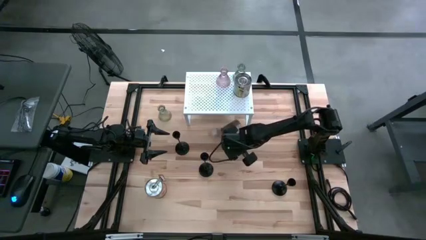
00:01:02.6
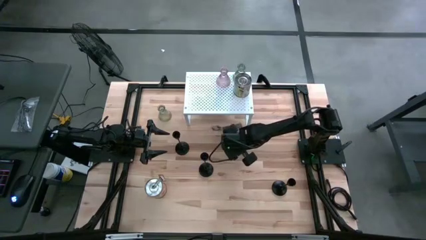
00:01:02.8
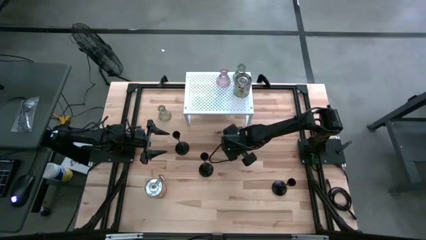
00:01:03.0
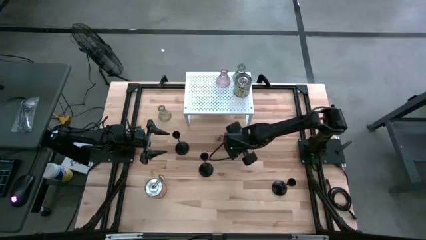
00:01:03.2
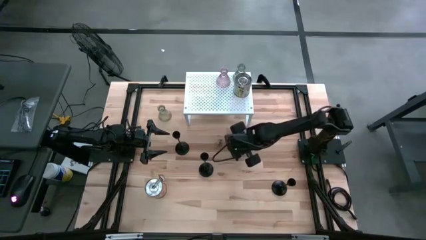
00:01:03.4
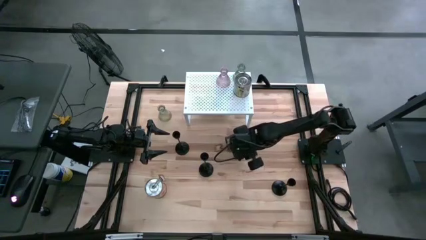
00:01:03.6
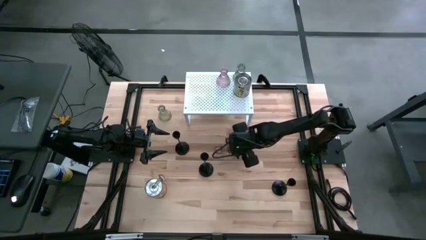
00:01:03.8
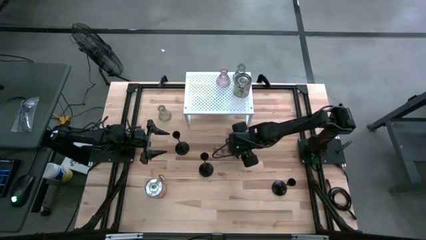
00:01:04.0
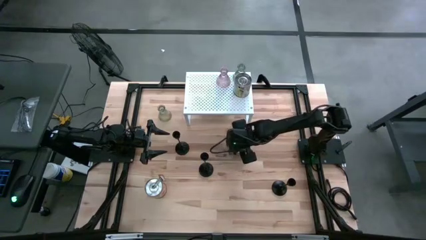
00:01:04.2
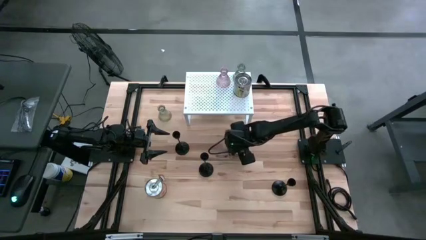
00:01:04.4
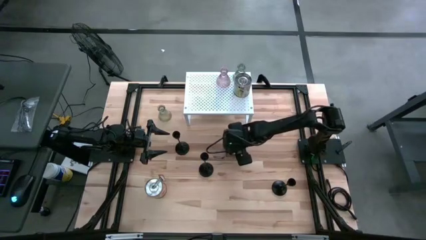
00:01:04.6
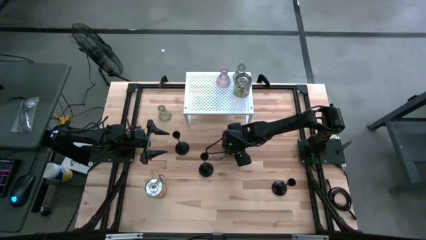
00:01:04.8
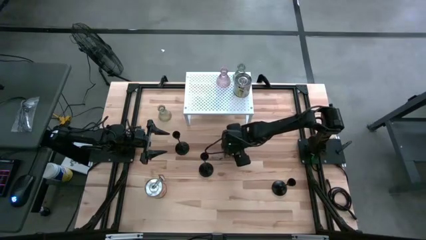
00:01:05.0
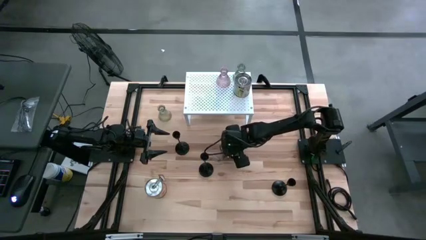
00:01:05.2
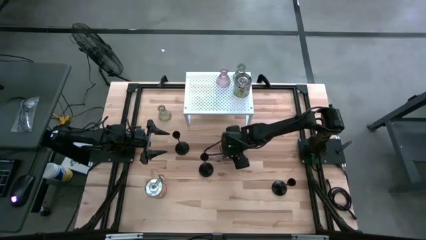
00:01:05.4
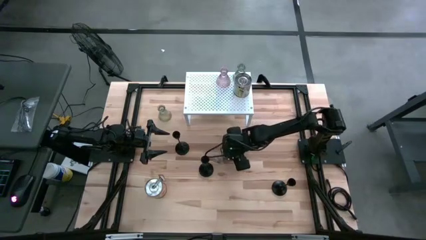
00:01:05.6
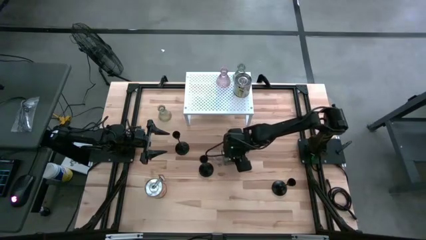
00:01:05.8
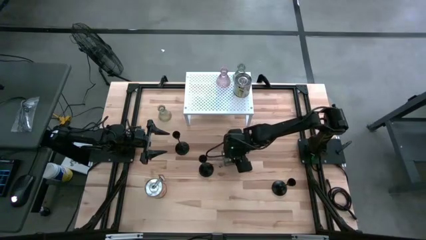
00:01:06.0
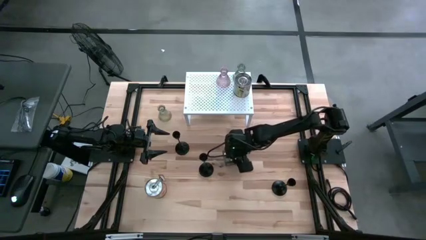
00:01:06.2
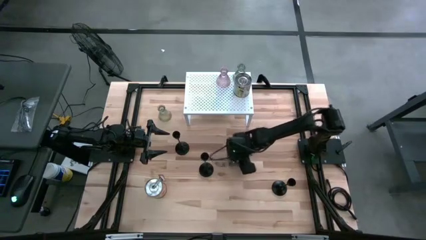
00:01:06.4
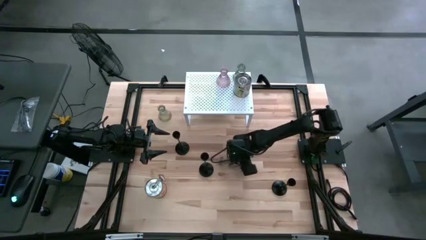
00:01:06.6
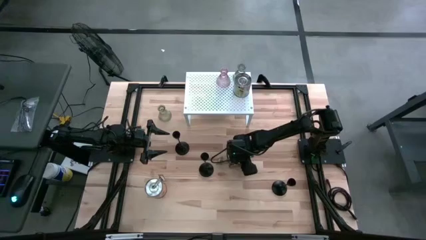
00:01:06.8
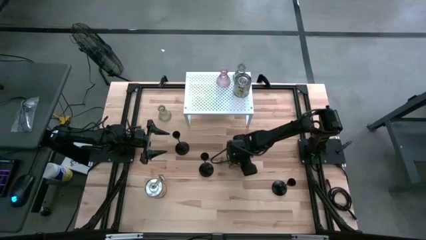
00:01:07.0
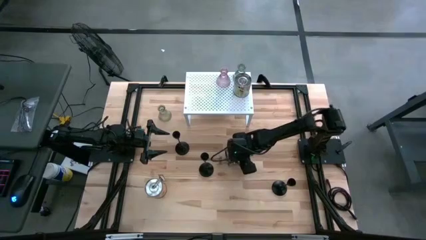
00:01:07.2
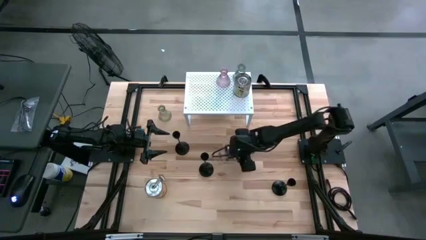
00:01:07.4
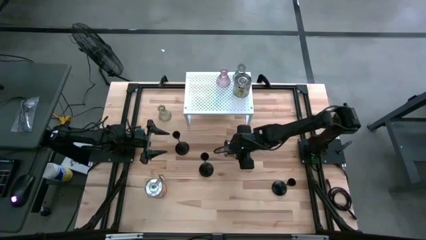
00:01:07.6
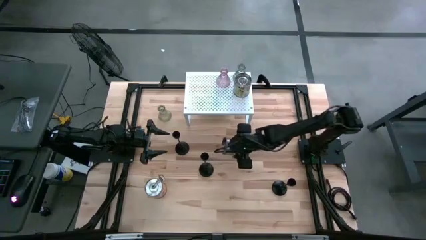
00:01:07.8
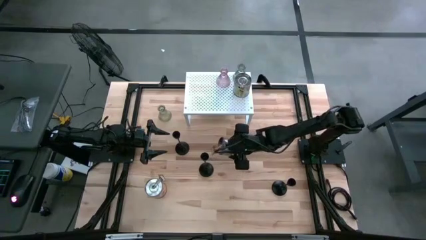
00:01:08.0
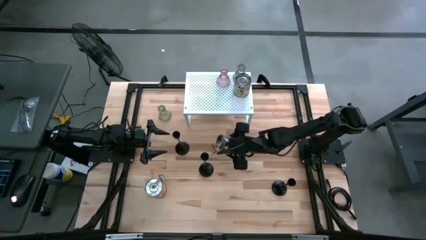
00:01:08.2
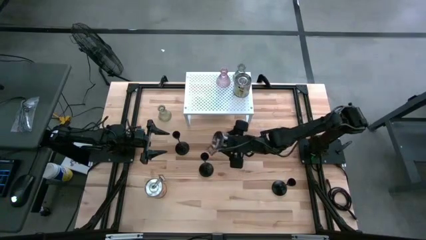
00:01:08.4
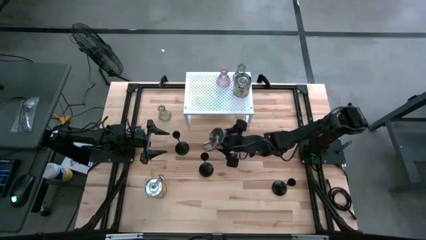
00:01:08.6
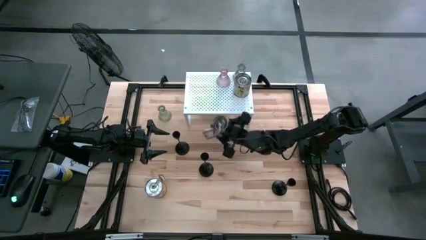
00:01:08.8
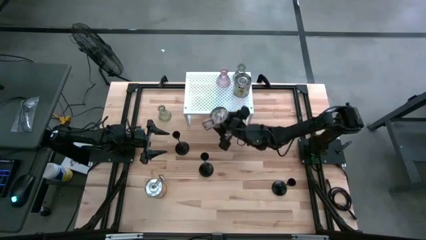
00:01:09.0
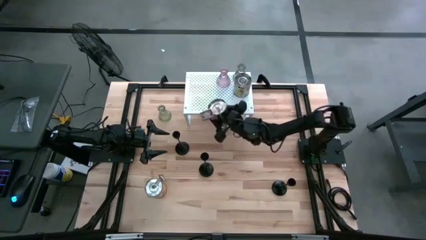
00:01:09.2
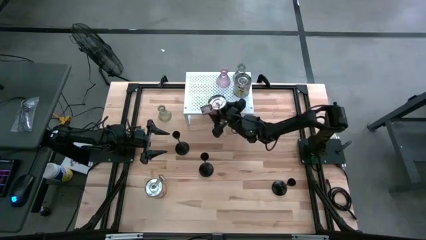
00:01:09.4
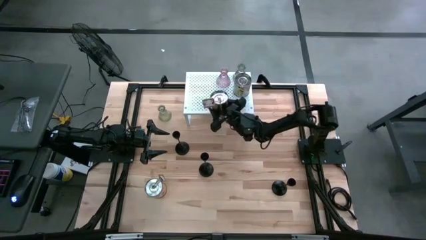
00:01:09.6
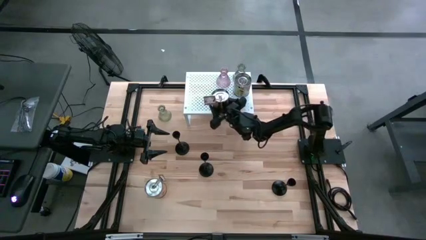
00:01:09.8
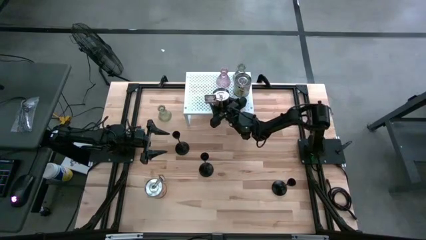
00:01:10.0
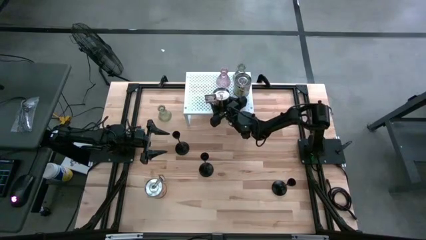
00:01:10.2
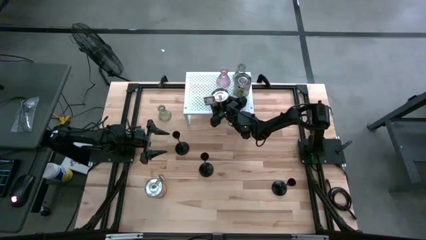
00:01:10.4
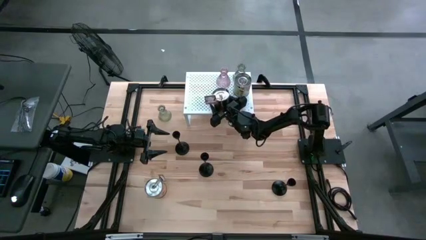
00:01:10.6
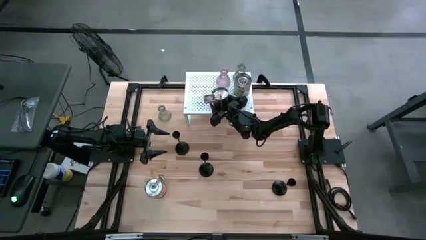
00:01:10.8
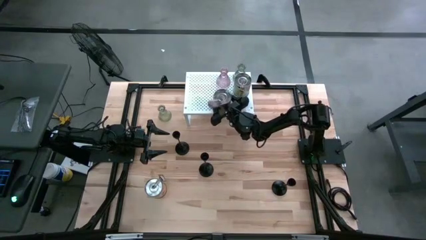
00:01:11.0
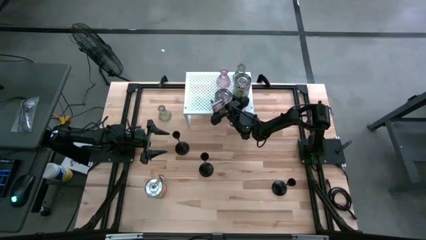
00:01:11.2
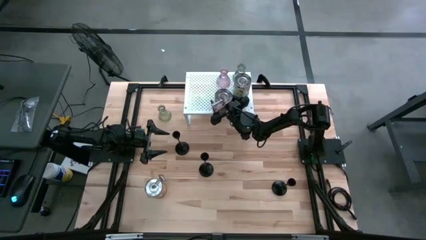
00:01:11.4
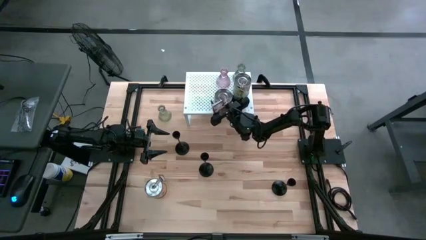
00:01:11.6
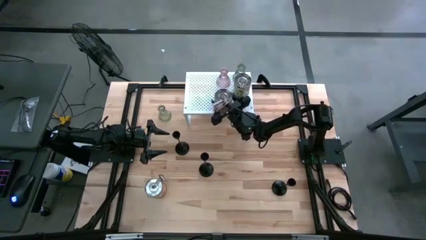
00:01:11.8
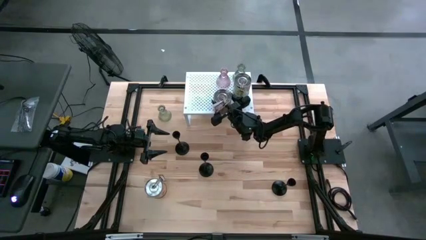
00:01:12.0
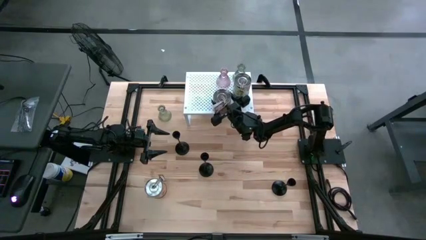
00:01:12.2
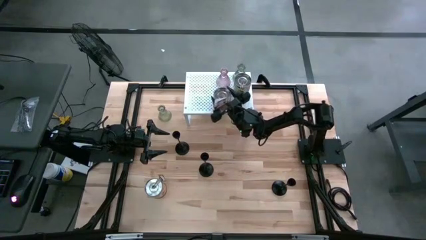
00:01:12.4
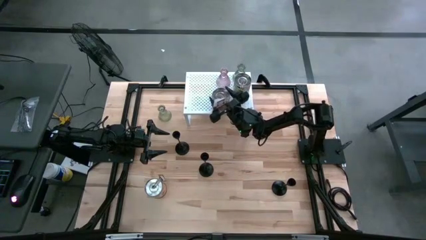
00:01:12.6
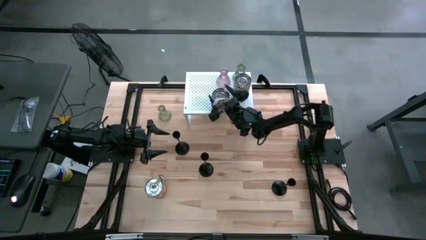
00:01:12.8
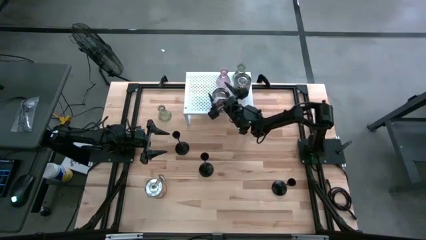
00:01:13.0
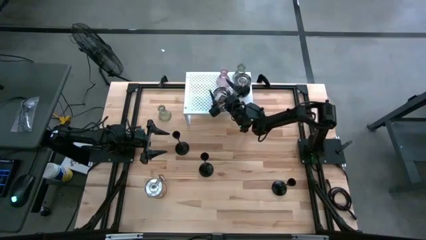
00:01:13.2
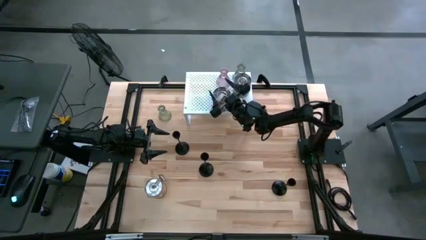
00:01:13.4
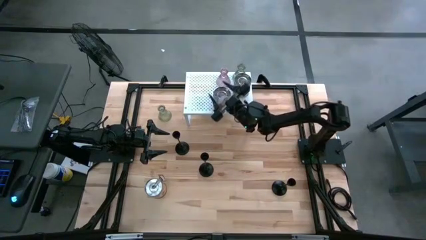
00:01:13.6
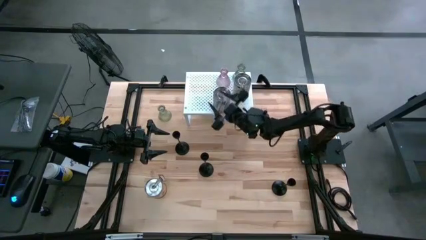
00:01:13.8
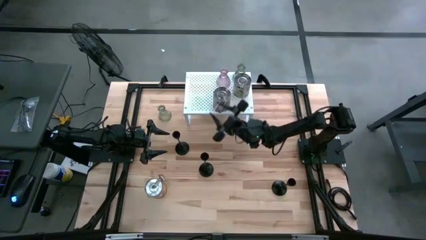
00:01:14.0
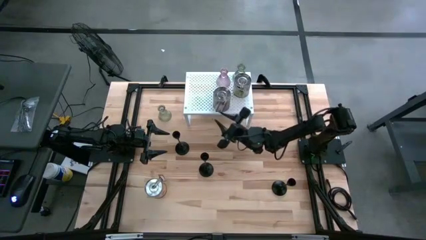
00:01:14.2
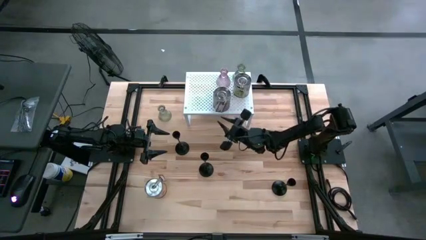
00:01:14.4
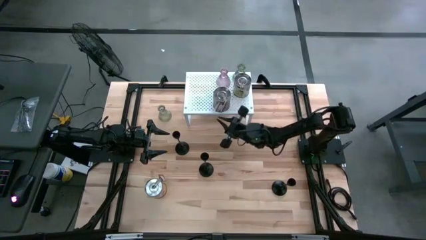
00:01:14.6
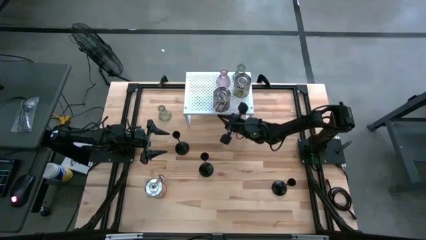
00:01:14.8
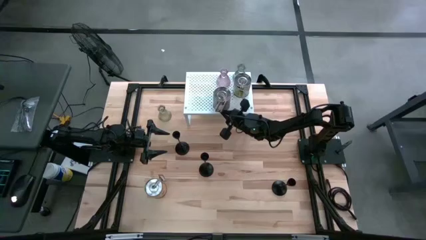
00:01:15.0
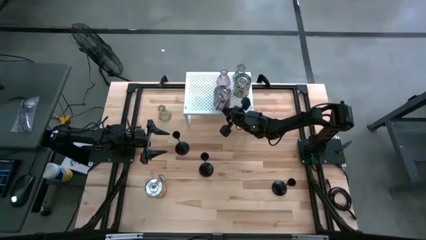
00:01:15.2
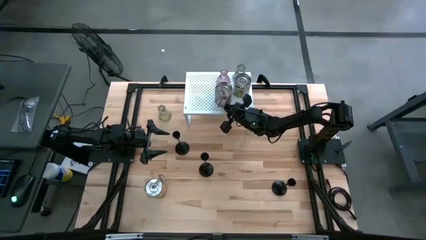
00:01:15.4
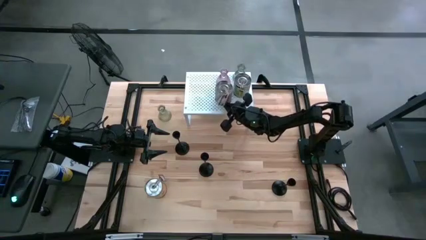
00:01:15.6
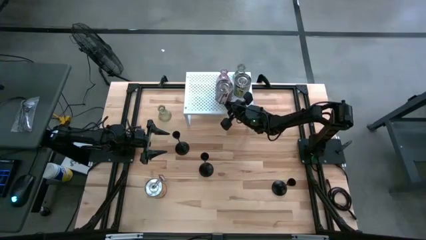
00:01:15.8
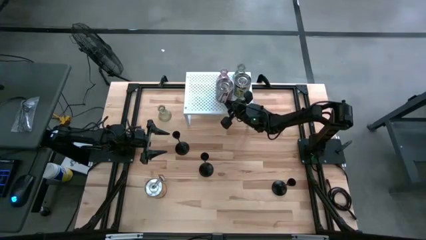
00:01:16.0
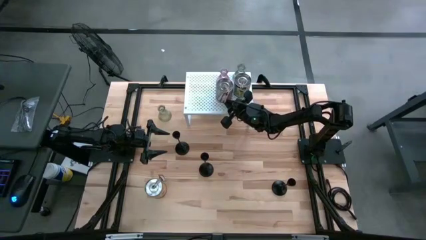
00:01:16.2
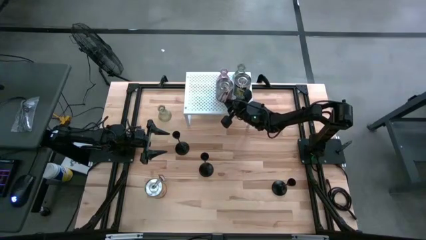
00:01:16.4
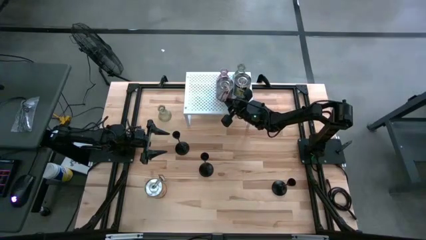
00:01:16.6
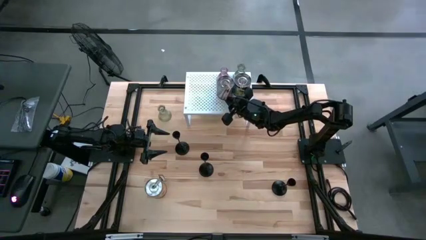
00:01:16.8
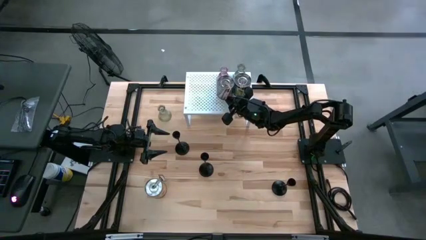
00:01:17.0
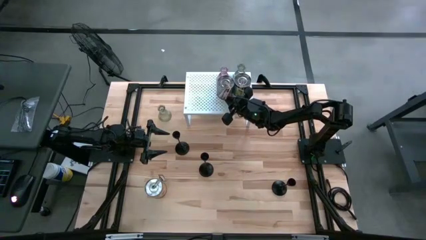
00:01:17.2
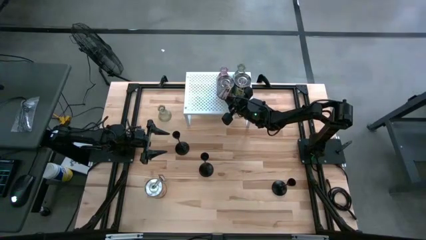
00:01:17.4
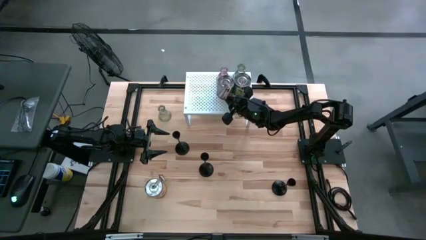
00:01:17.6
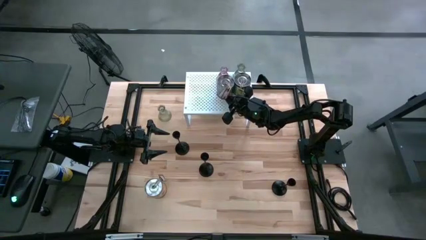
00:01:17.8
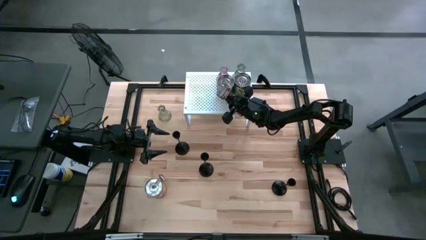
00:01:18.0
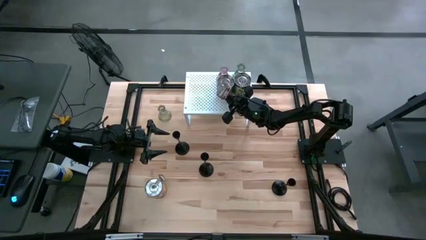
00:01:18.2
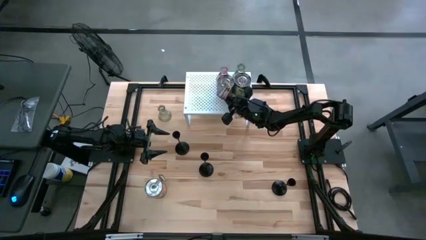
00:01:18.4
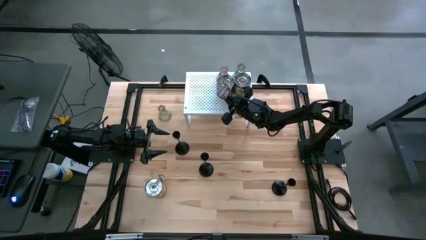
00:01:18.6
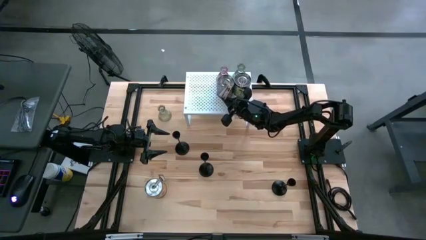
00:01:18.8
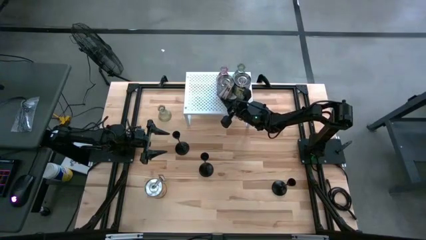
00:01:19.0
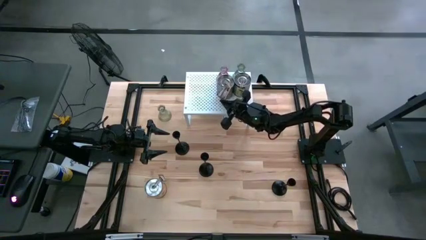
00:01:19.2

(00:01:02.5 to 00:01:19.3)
Task: Pick & Place candle stick holders
Put the brown scented candle on the shelf aligned with the other scented candle
